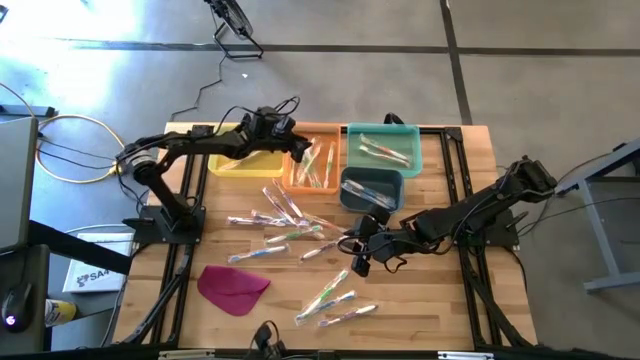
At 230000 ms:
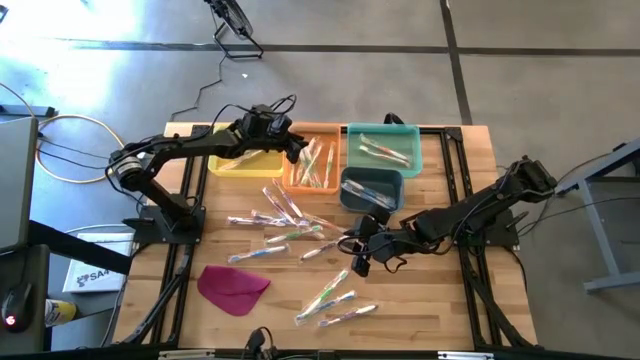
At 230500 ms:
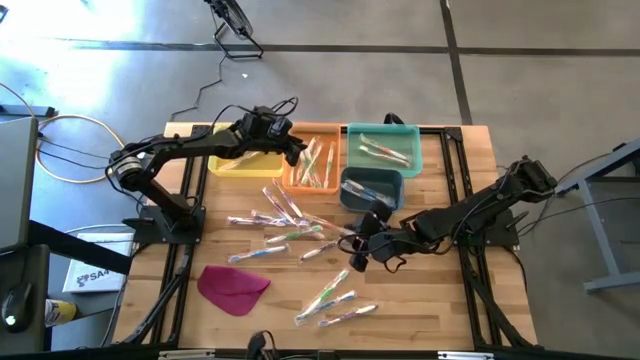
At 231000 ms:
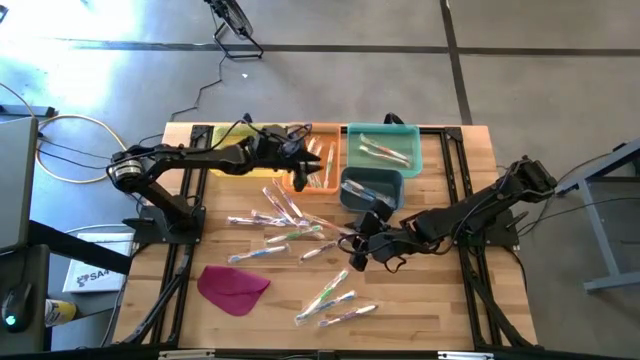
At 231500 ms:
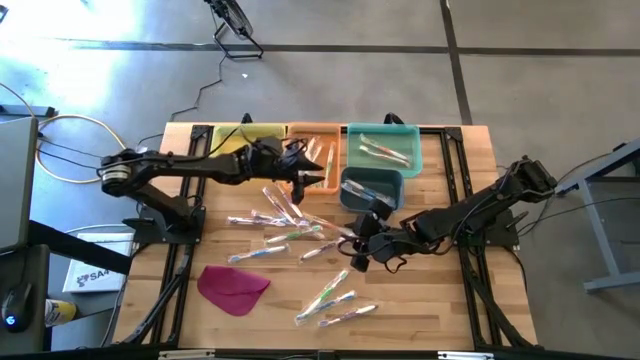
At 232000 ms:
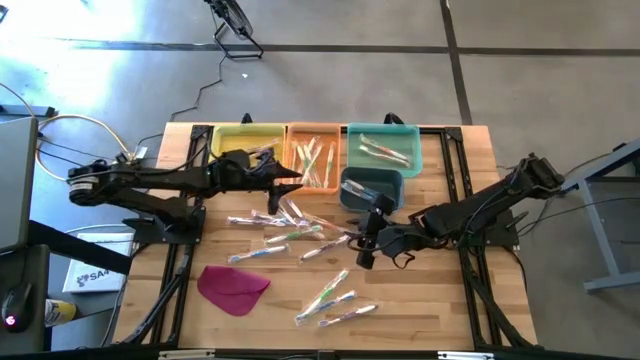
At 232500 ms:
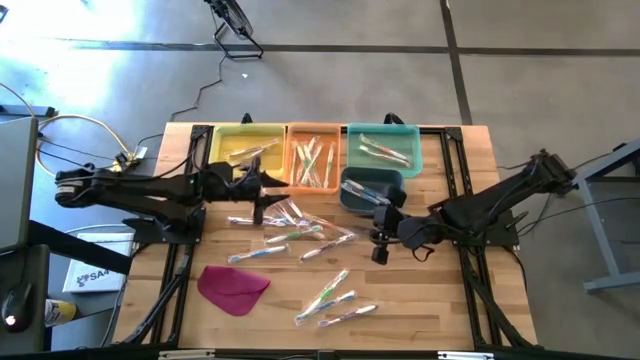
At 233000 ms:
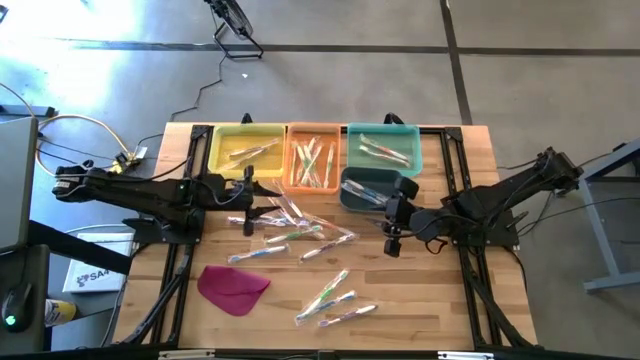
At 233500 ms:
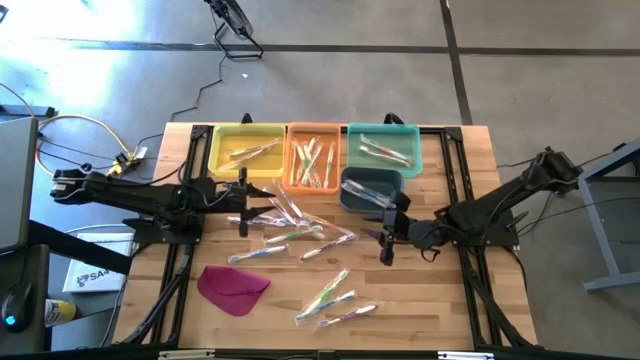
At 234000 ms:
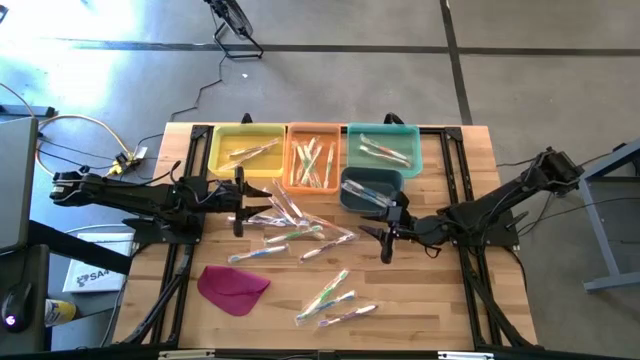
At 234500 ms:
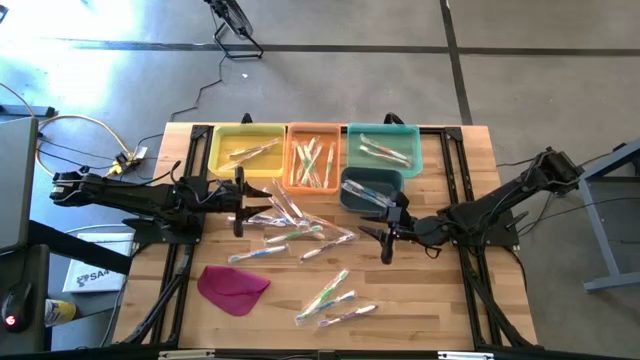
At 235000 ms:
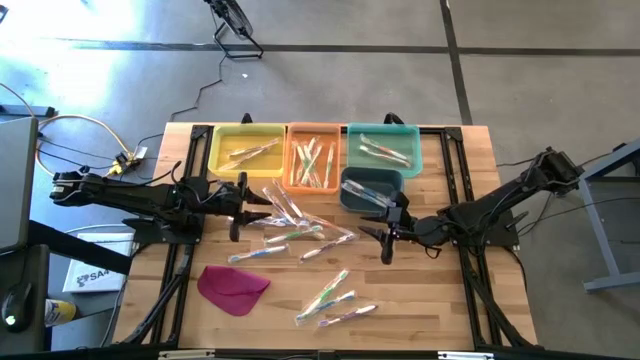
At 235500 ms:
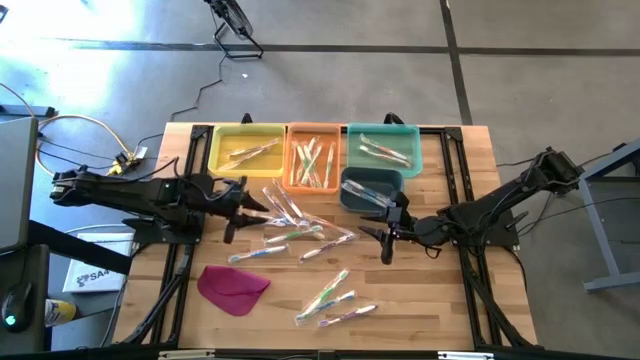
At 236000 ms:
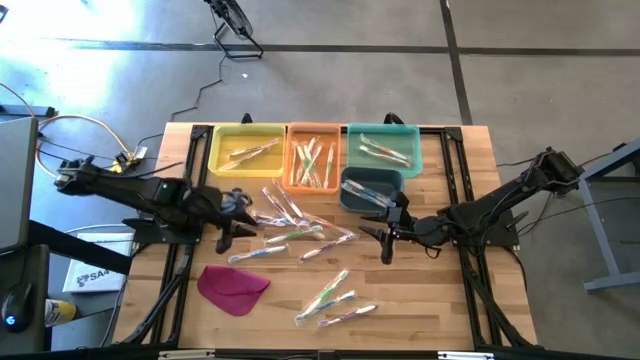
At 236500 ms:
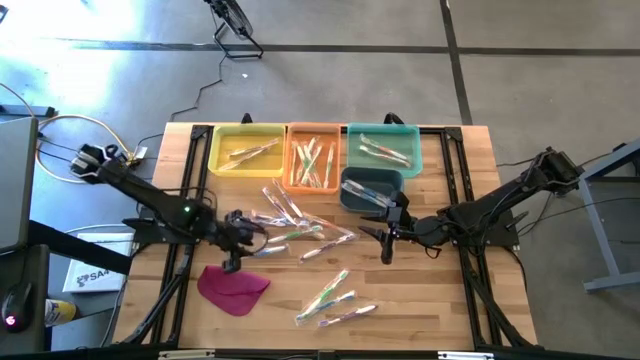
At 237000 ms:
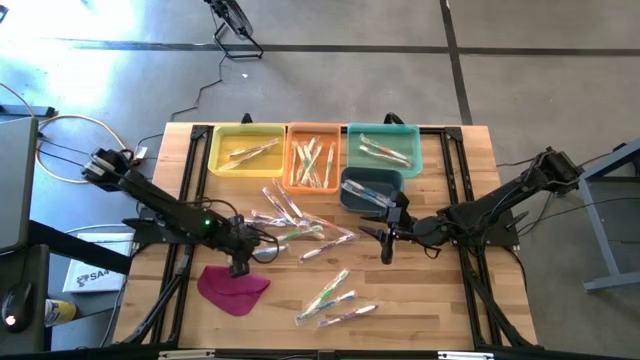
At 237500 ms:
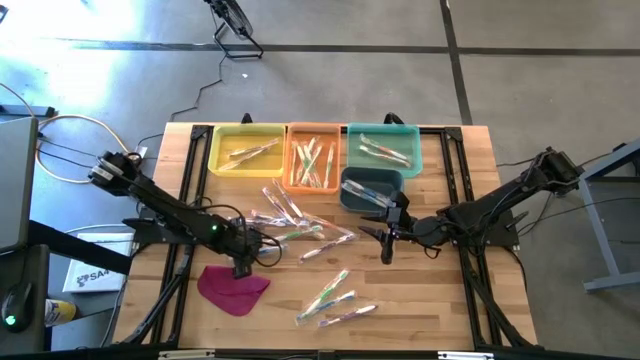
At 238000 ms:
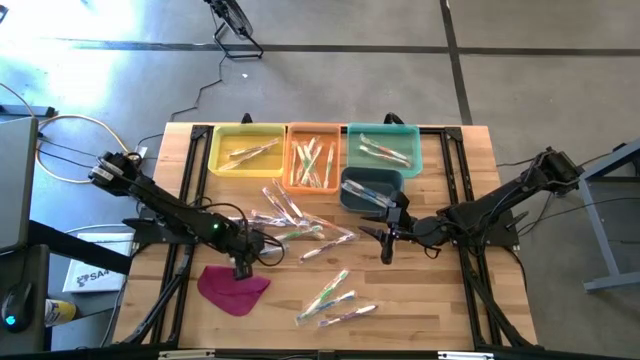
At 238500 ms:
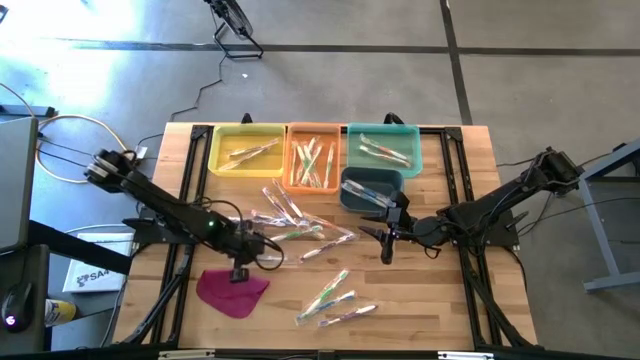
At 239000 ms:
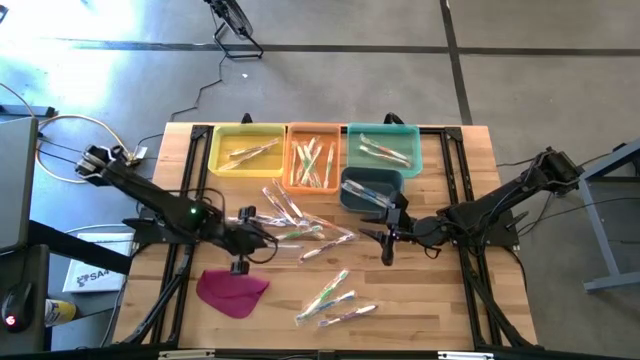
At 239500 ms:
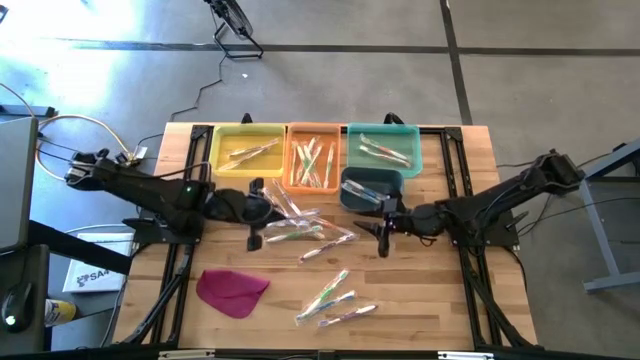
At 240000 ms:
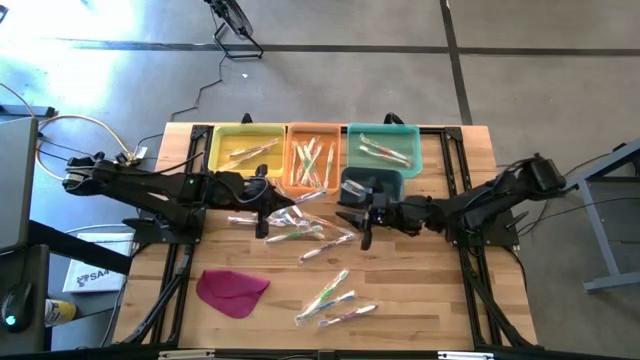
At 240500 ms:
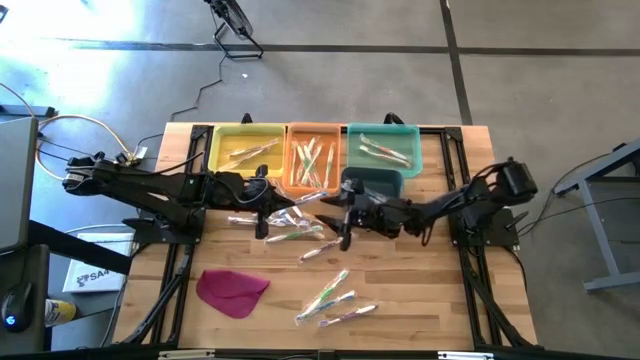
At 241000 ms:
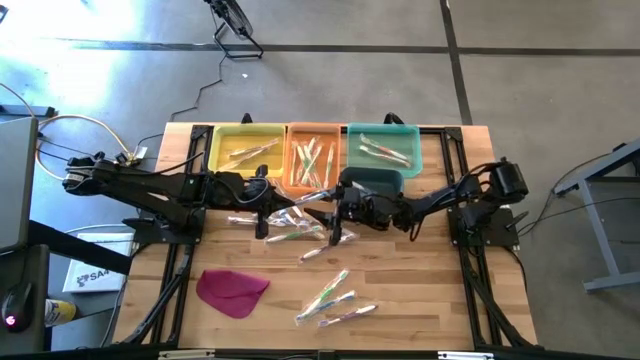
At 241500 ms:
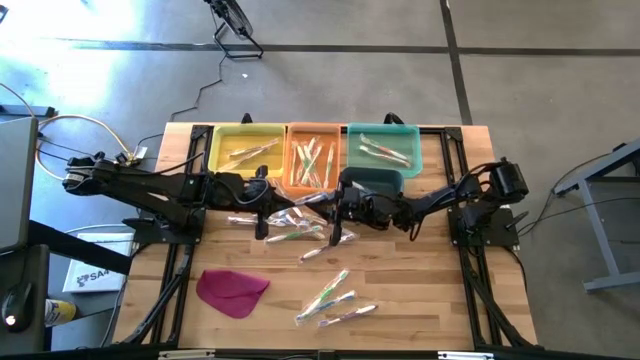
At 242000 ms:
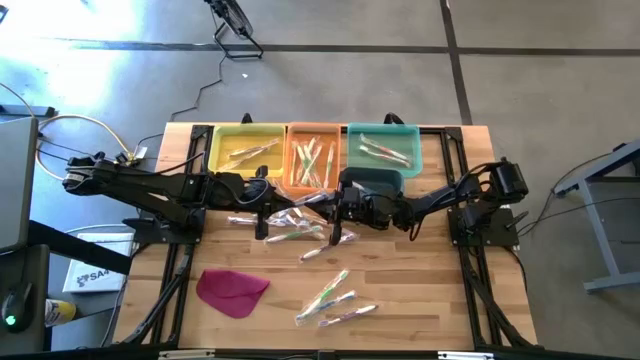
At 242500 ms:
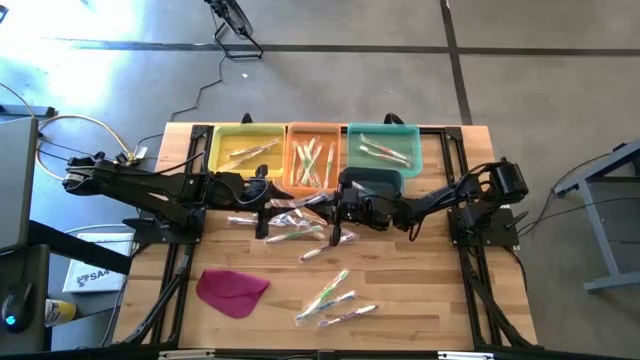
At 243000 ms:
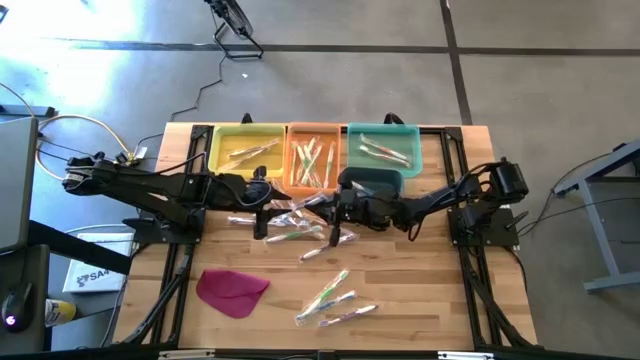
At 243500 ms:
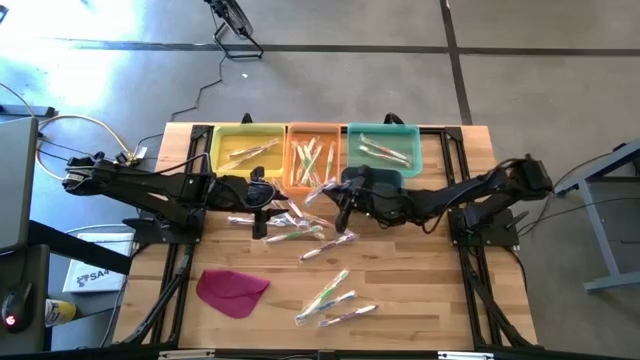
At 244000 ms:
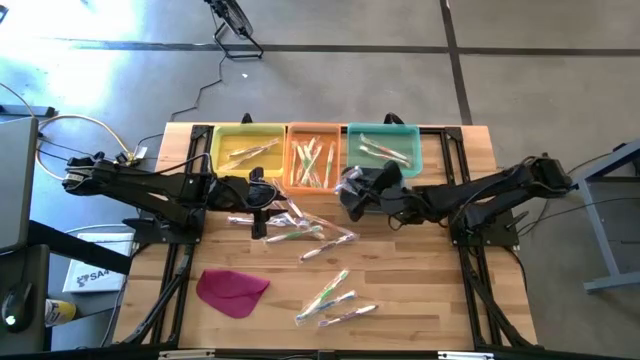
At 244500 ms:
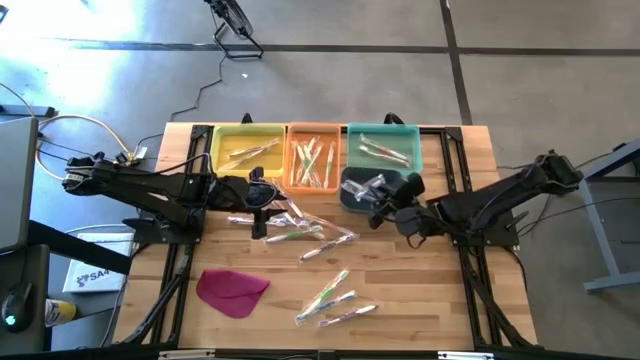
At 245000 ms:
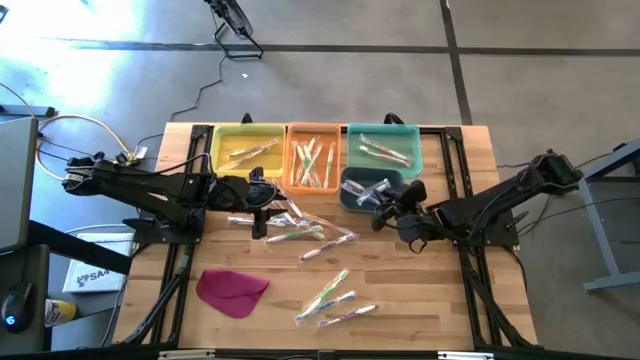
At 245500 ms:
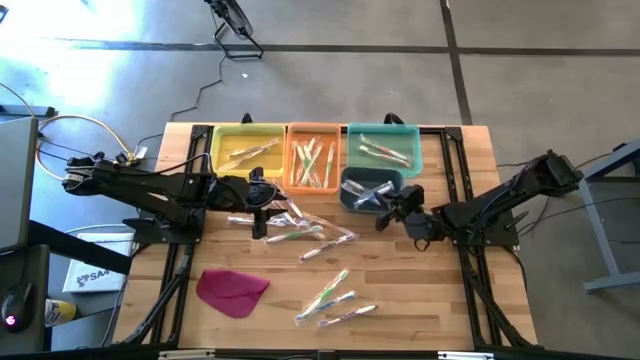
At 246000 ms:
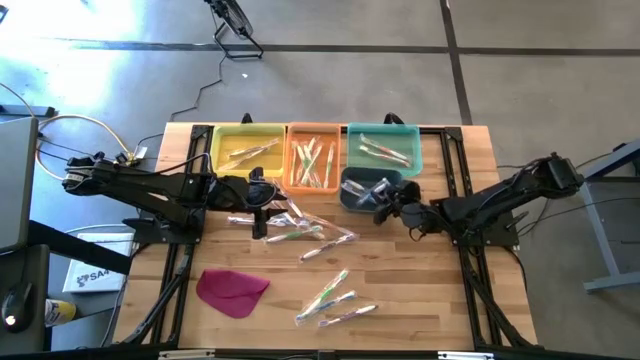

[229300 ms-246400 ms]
Task: Pick & Place Toothbrushes
Put the blue toothbrush into the dark blue bin

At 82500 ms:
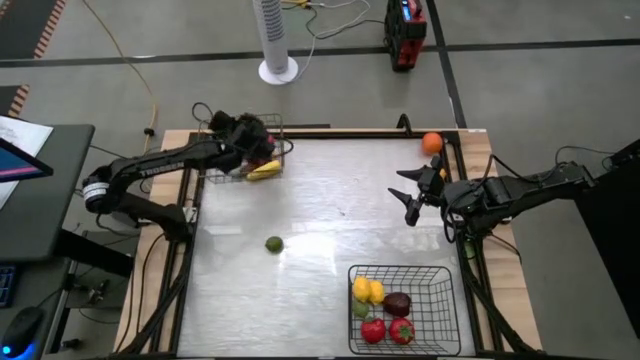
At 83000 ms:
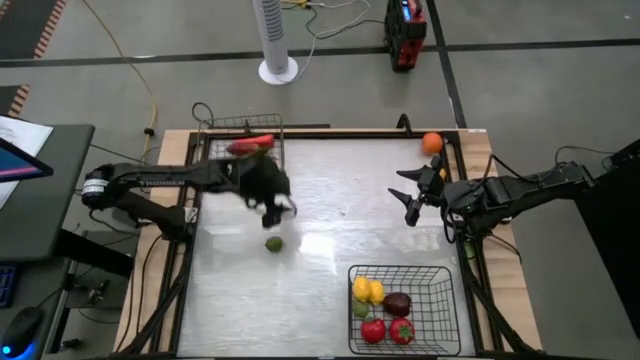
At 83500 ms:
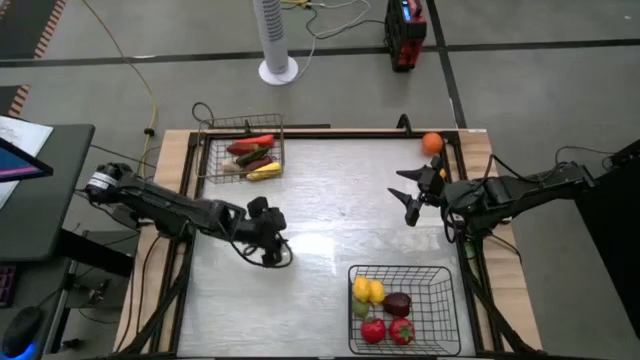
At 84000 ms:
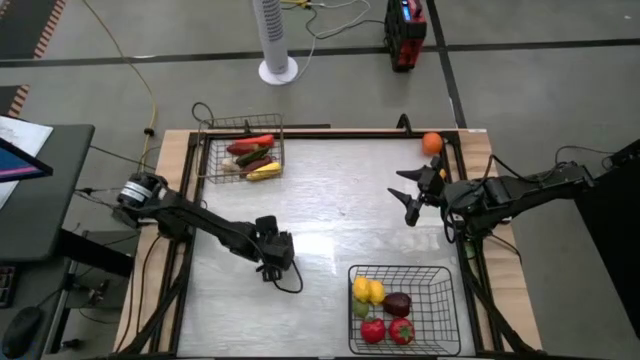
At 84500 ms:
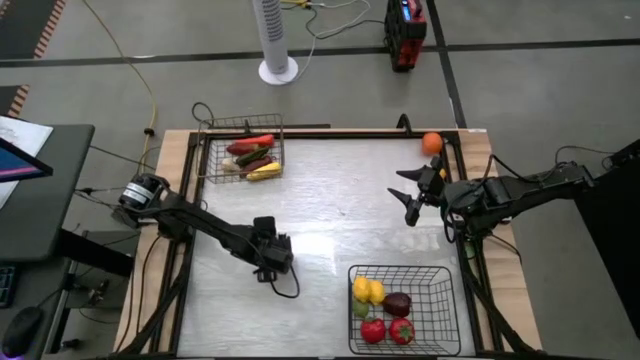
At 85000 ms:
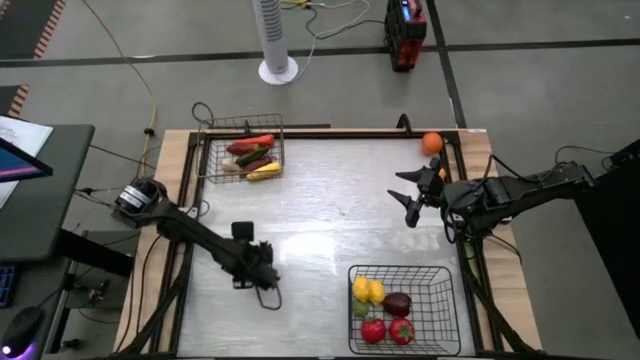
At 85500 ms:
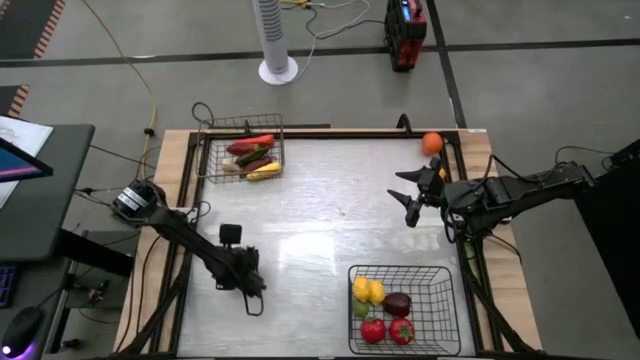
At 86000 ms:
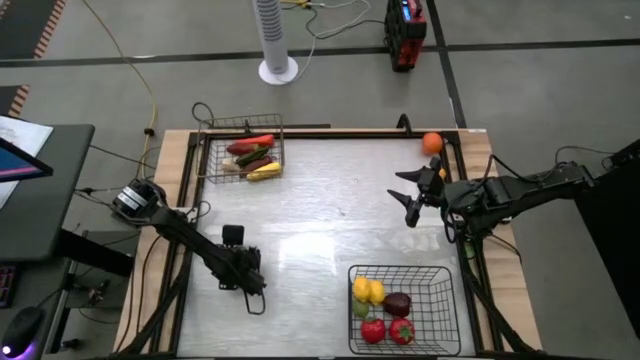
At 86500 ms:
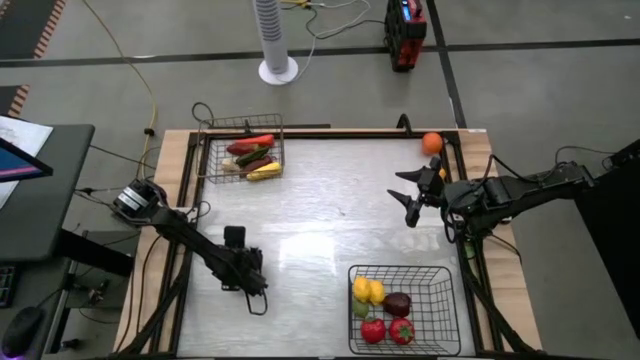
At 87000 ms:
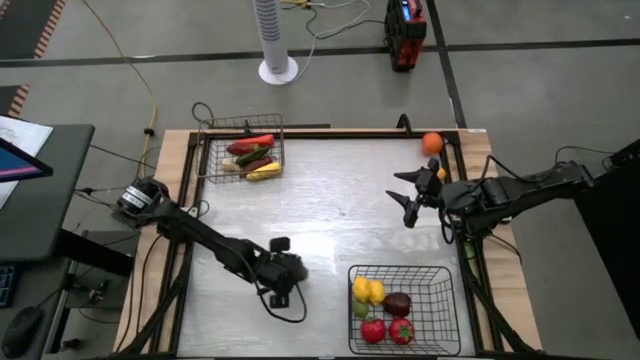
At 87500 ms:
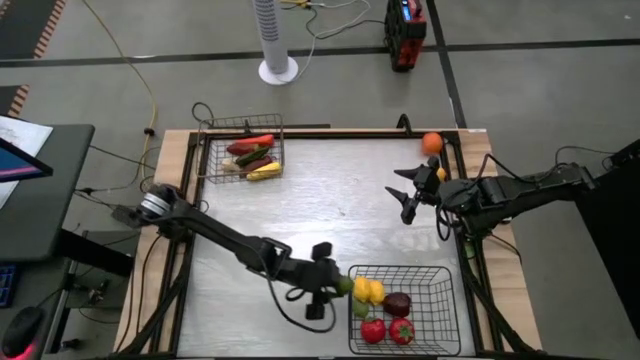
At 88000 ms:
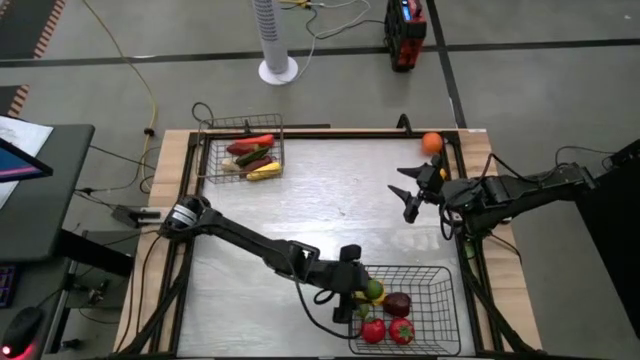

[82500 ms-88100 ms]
Task: Sort produce into baskets
Put the lime into the bottom wire basket
